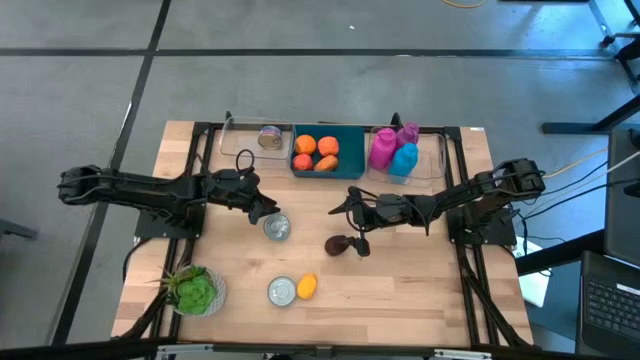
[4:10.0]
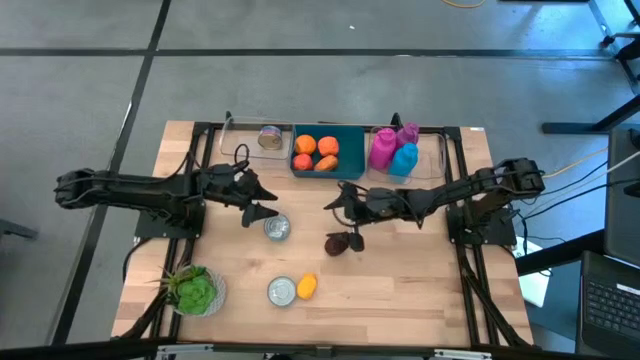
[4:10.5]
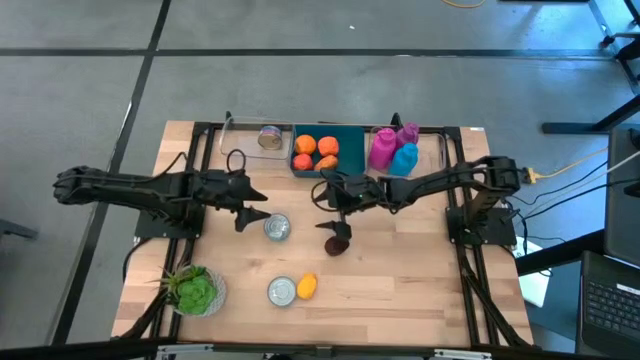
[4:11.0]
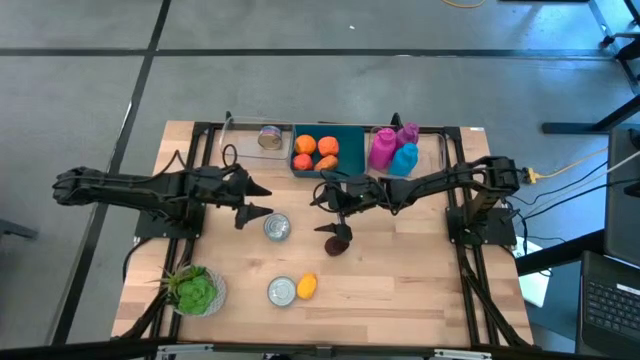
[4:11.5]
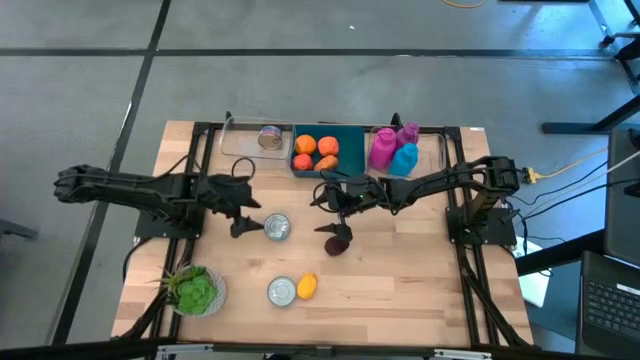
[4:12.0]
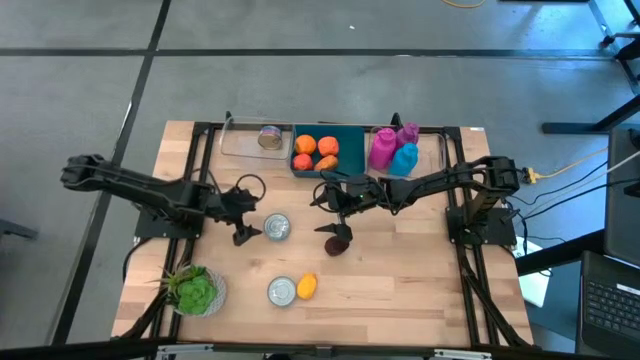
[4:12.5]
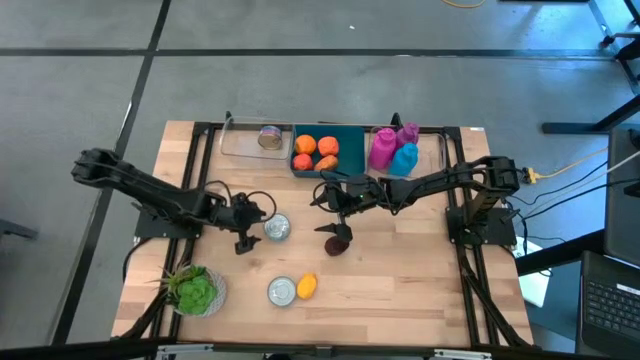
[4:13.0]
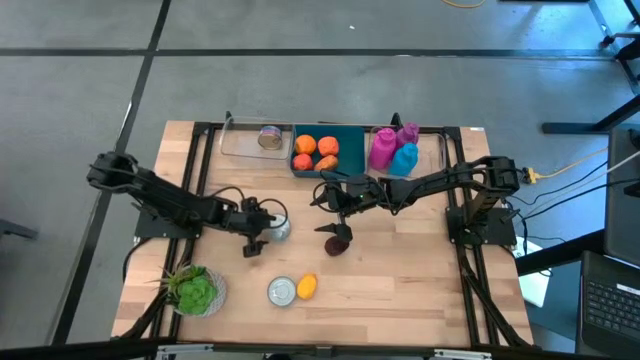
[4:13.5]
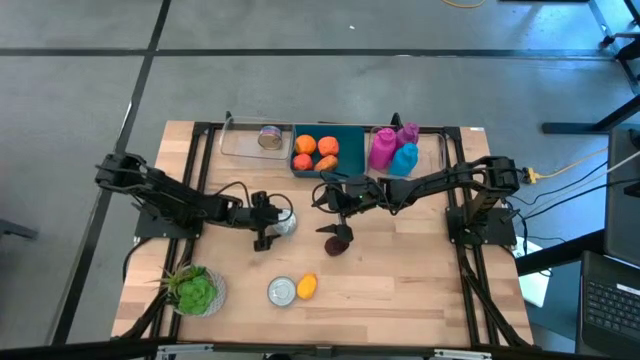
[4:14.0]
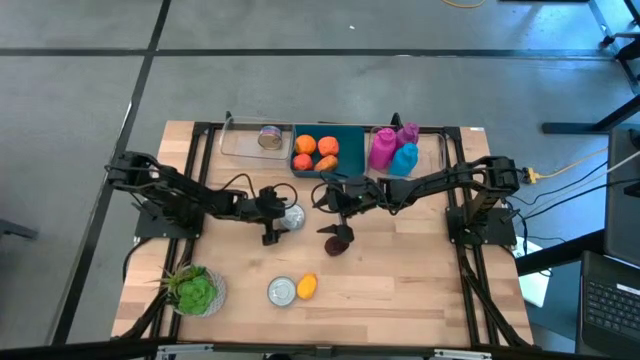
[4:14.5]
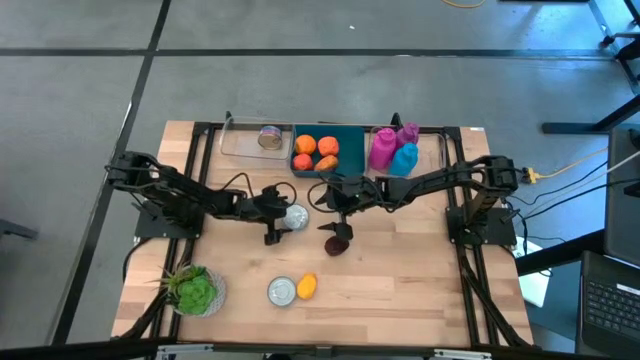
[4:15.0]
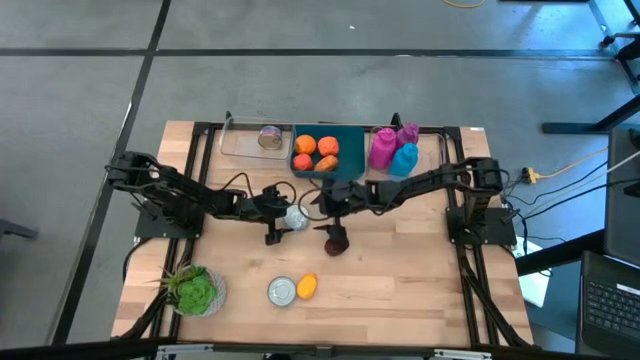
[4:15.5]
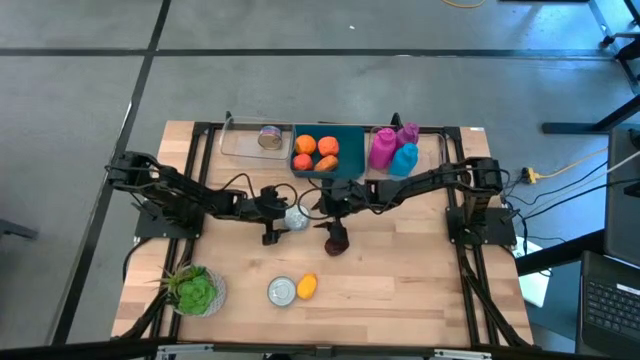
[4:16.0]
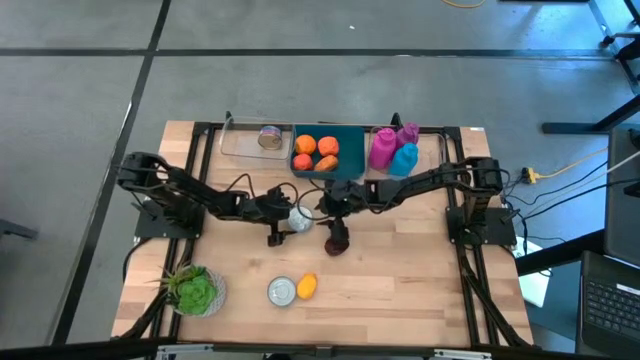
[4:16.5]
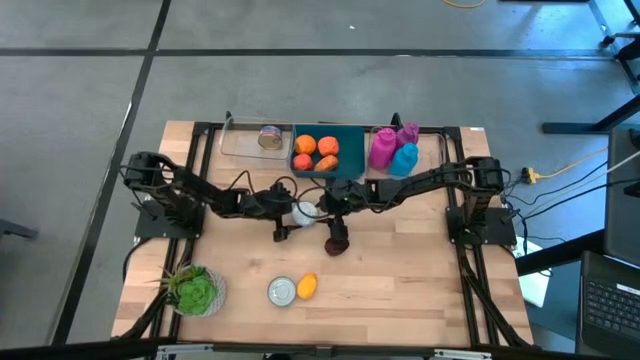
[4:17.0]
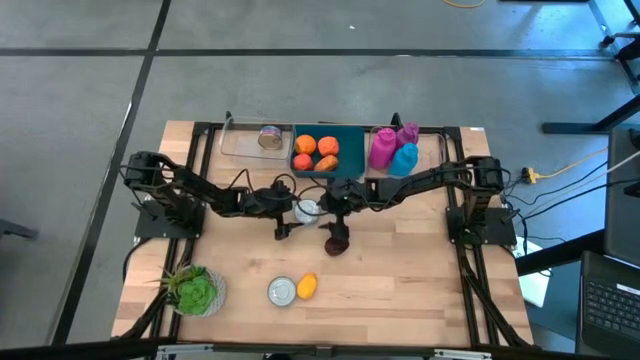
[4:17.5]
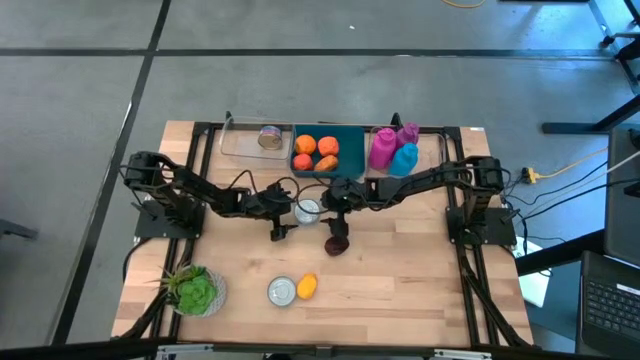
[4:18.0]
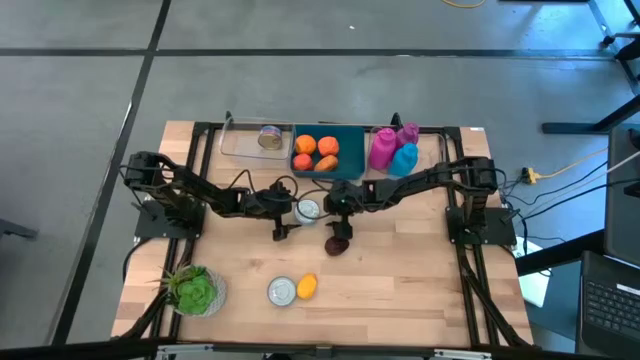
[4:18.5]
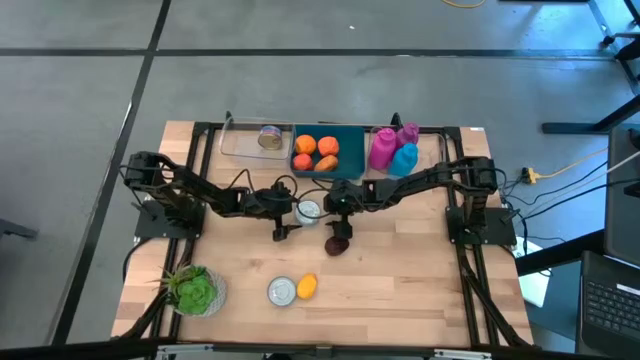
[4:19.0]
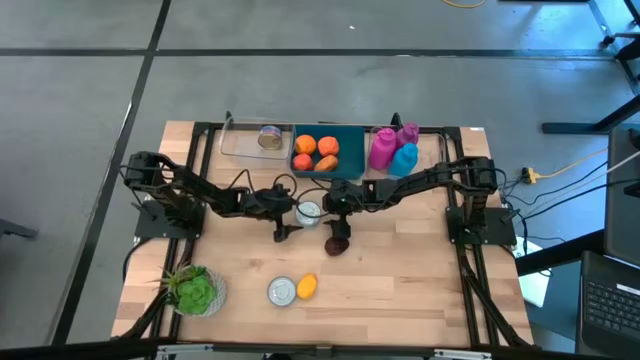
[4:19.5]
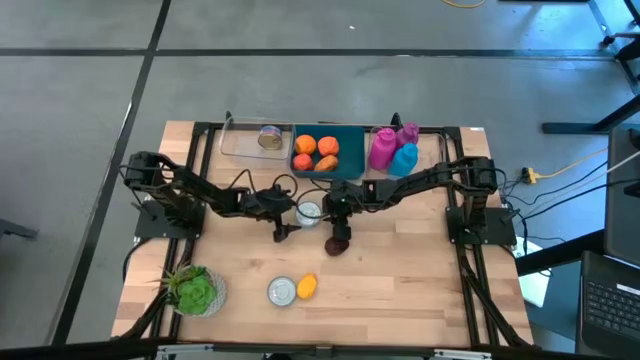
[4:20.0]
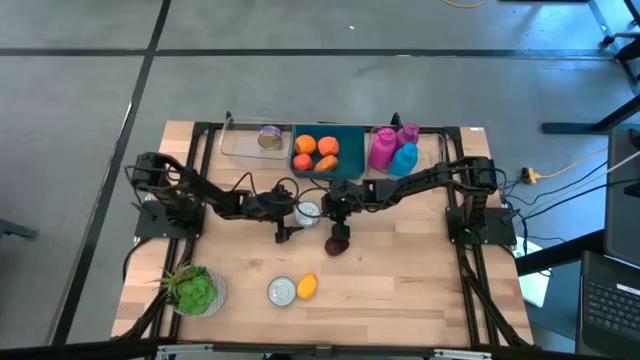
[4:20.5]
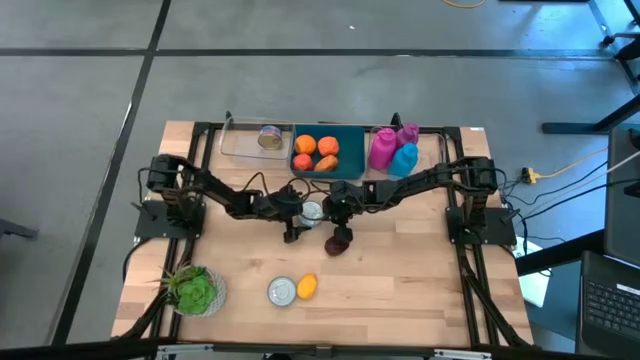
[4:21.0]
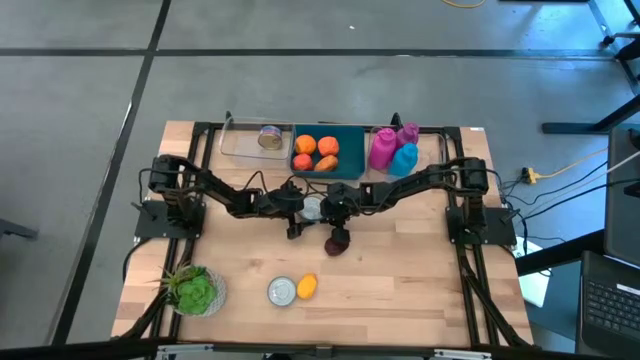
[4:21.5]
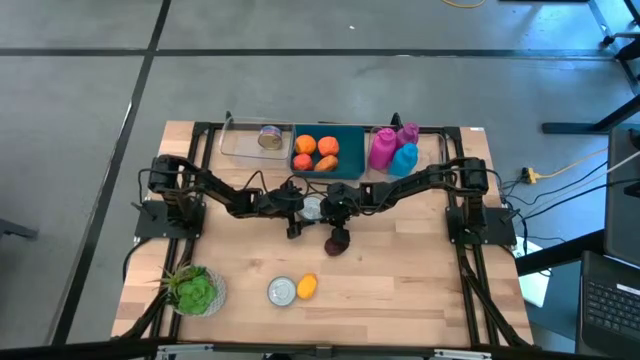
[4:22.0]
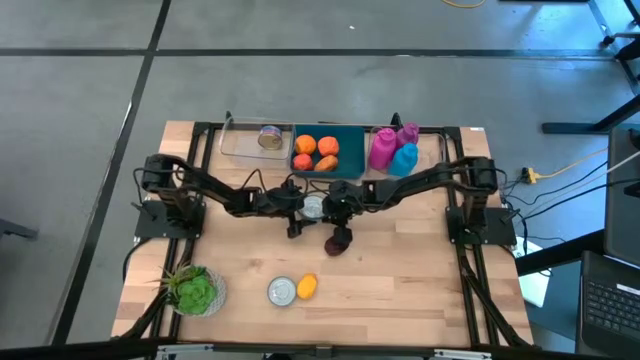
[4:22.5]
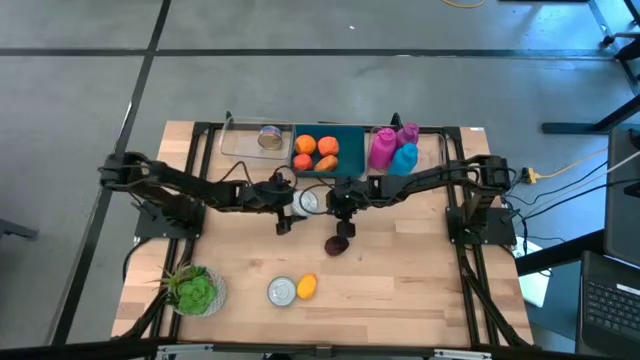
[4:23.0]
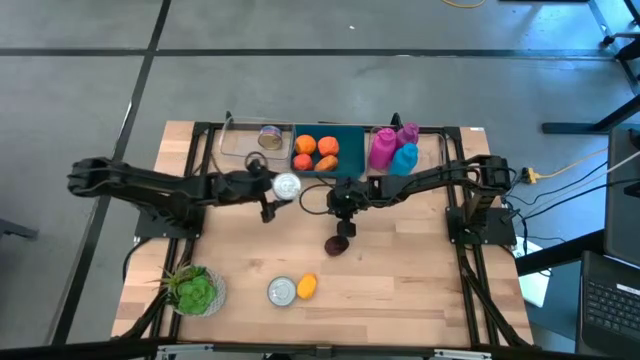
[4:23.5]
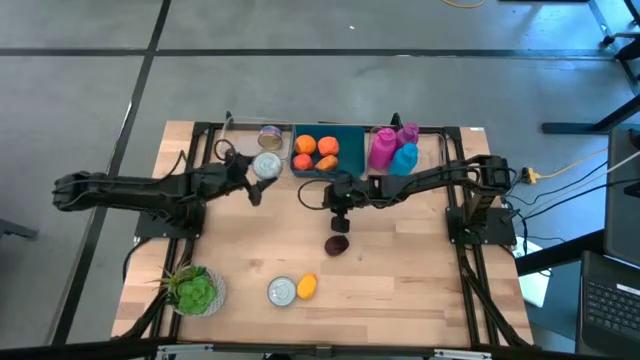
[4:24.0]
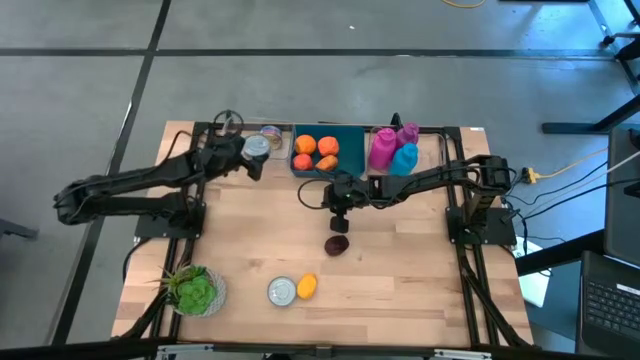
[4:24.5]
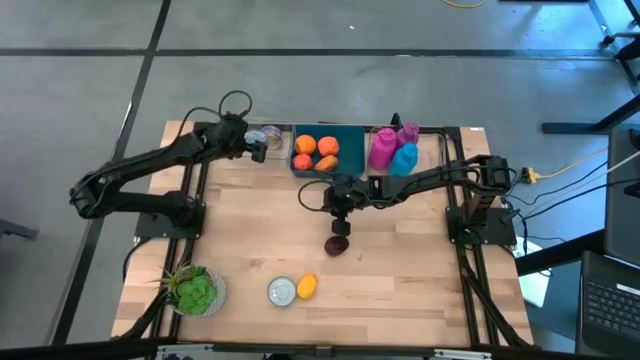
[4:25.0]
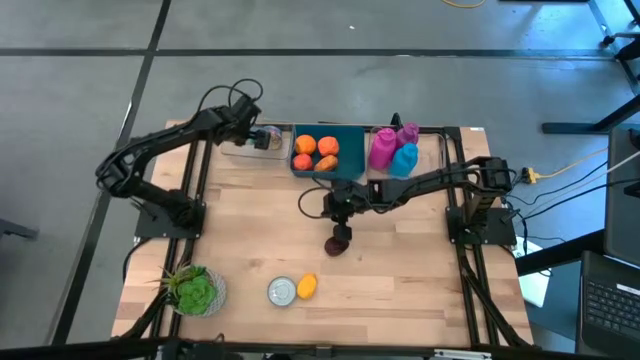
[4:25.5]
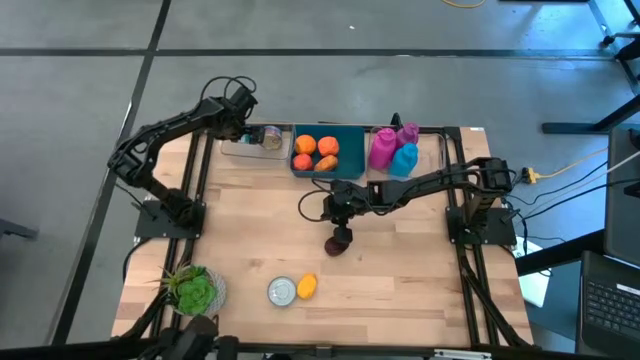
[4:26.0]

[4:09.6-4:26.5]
Task: Pick & Place Food Item
Put the top yellow blue tuna can into the left transparent bin

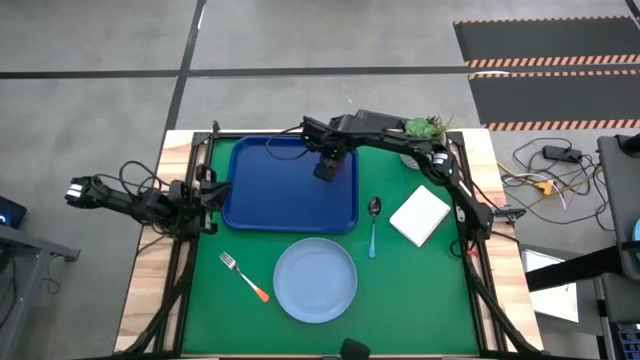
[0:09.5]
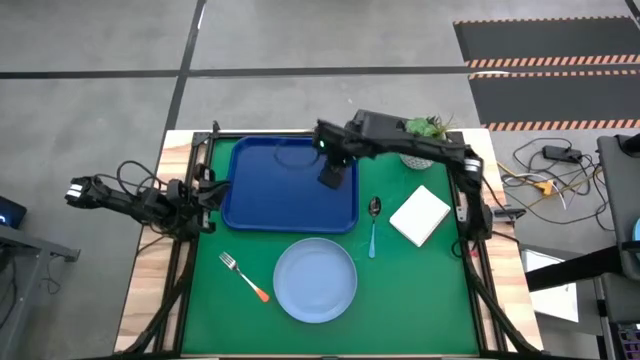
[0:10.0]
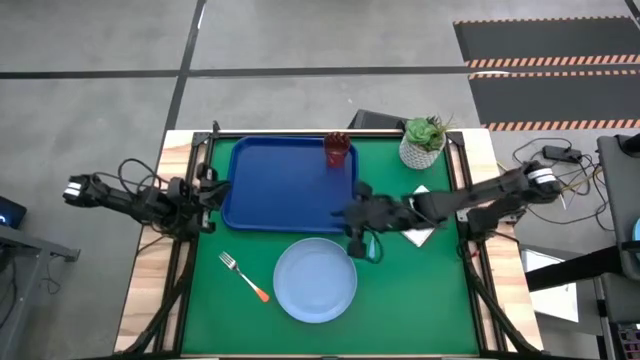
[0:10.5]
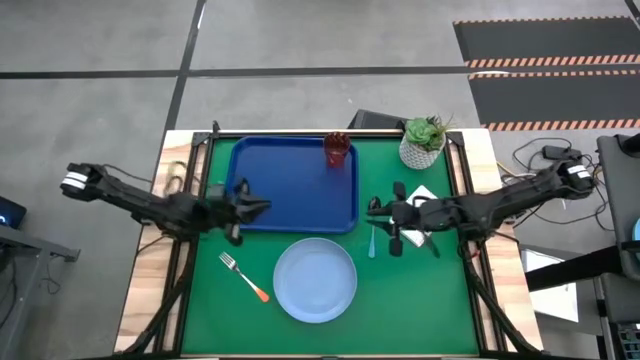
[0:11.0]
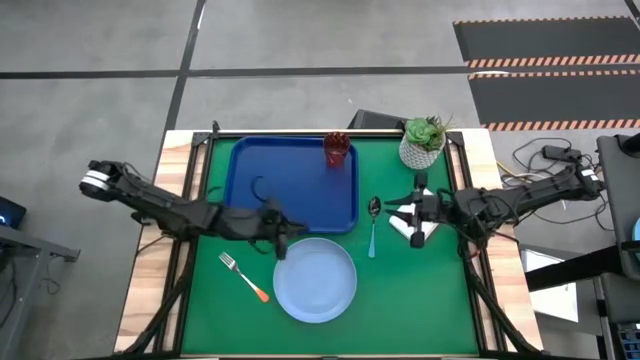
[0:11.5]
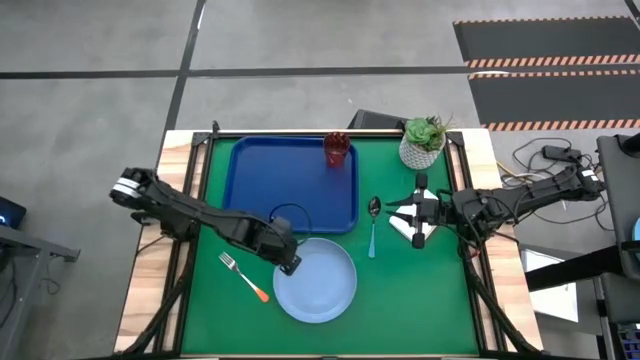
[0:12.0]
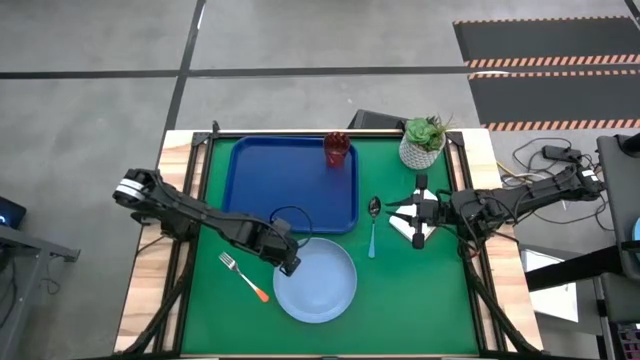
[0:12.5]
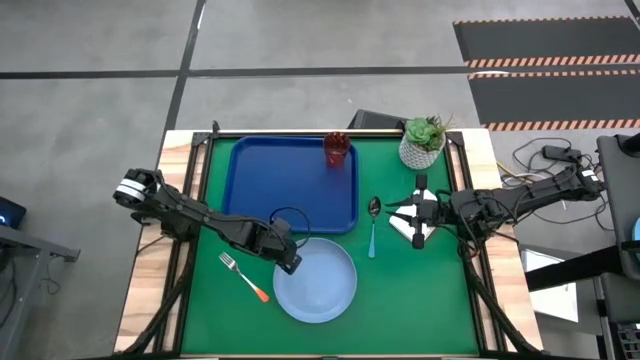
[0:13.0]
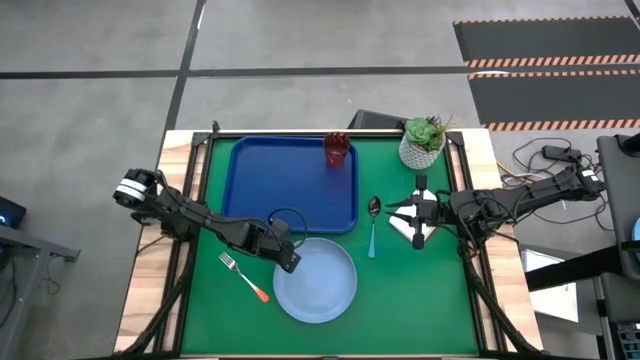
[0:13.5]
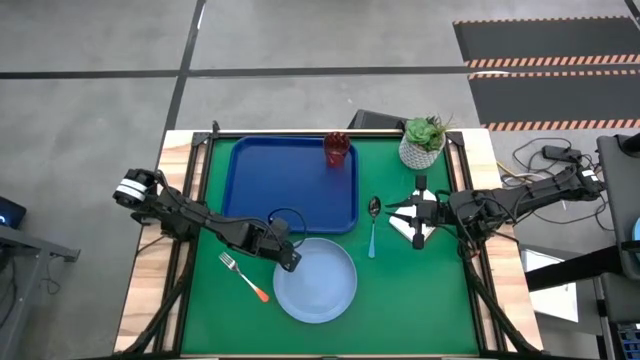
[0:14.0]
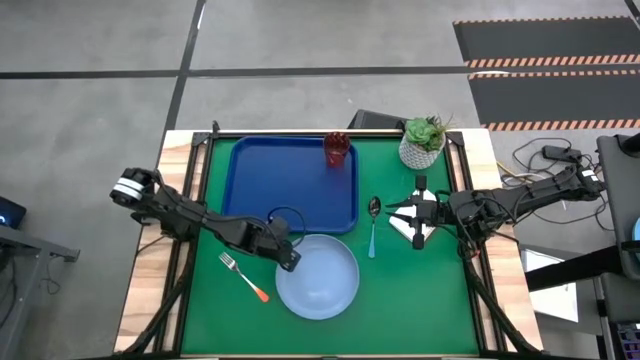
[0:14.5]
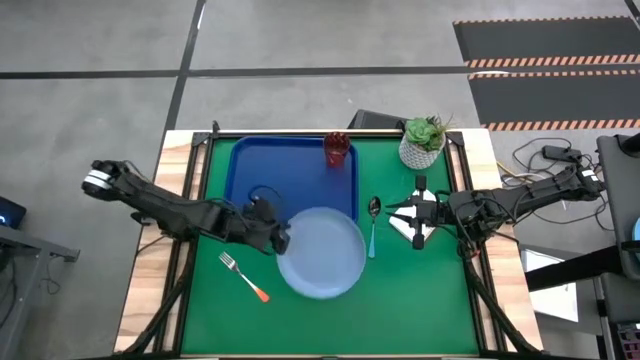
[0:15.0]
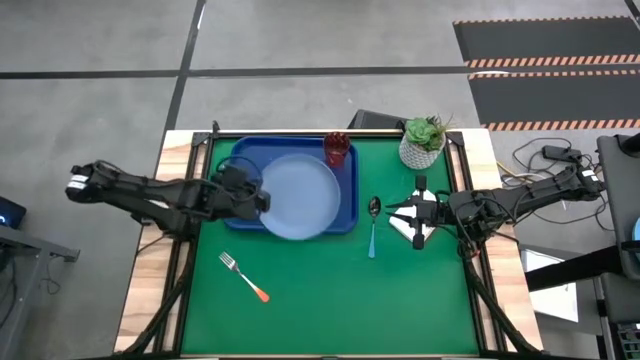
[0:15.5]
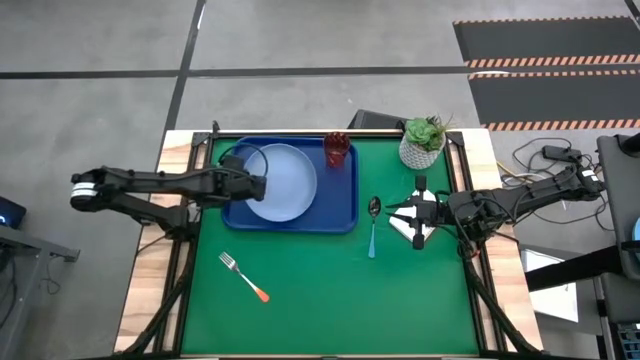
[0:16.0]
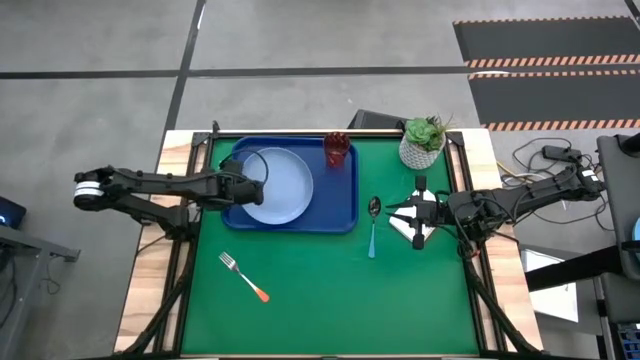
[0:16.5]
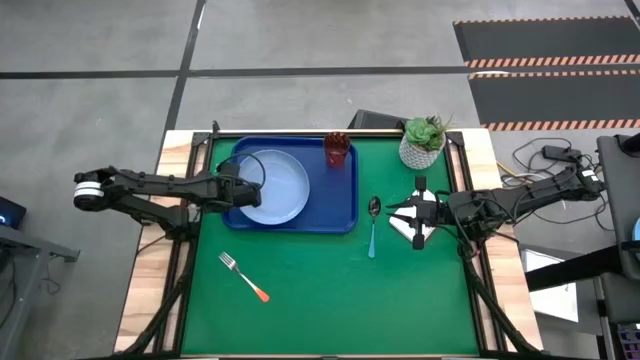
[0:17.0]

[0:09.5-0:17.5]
Task: Pick and place plate/cup/fork/spoon on tray
Put the blue plate on the blue tray to the bottom left of the orange cup
